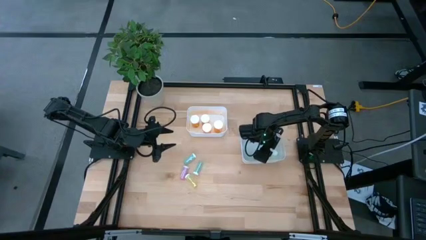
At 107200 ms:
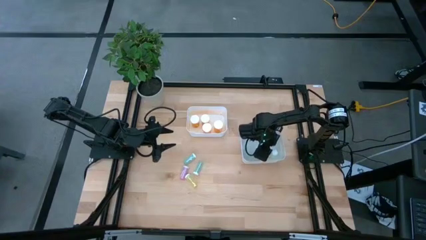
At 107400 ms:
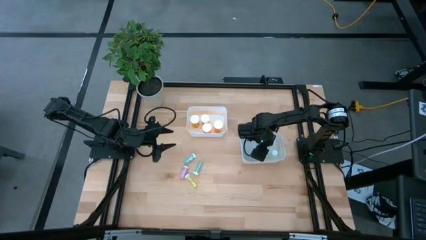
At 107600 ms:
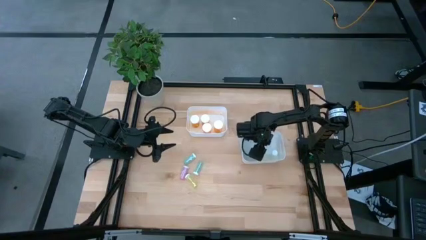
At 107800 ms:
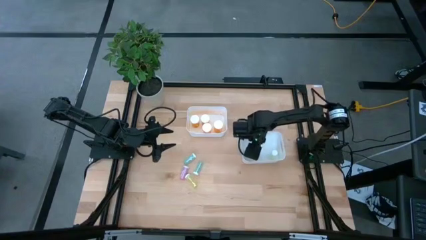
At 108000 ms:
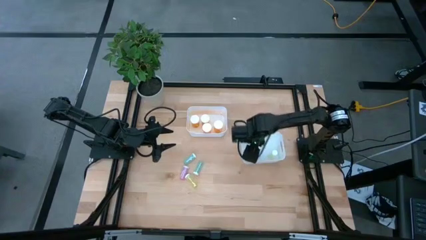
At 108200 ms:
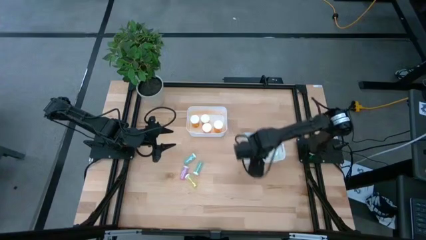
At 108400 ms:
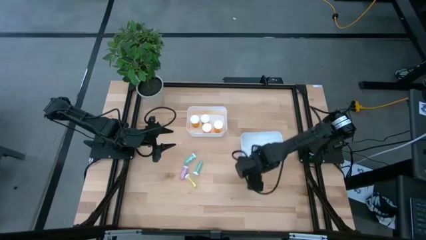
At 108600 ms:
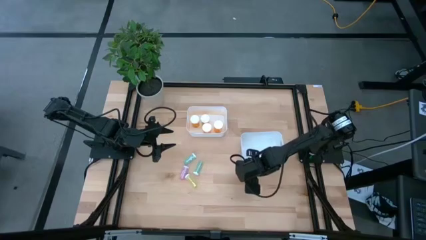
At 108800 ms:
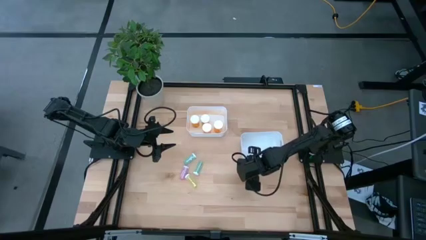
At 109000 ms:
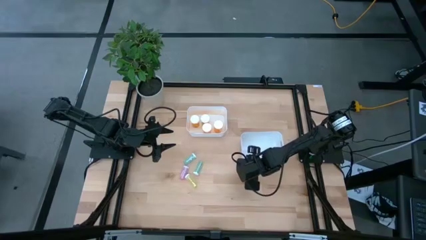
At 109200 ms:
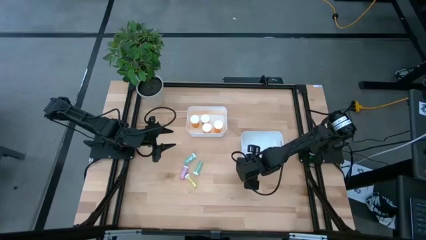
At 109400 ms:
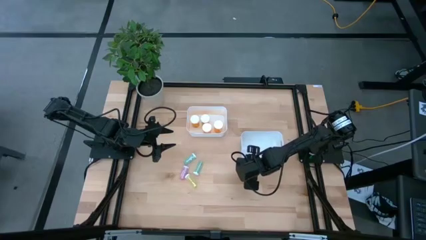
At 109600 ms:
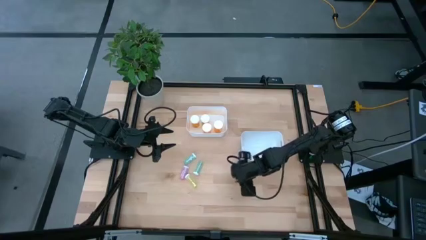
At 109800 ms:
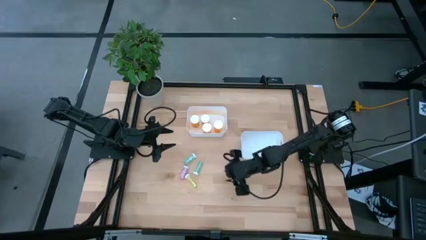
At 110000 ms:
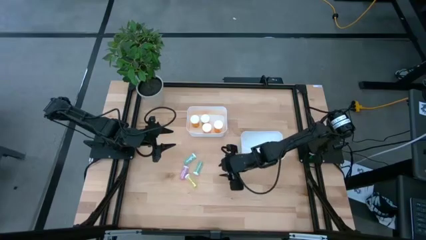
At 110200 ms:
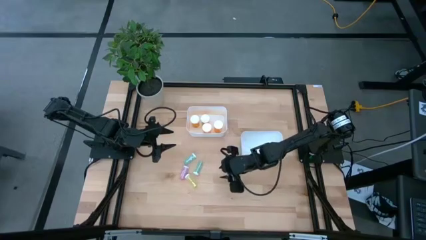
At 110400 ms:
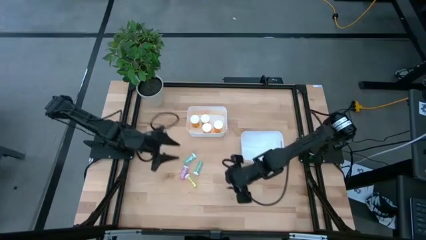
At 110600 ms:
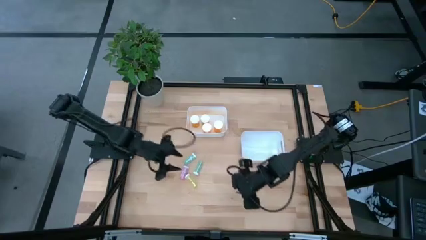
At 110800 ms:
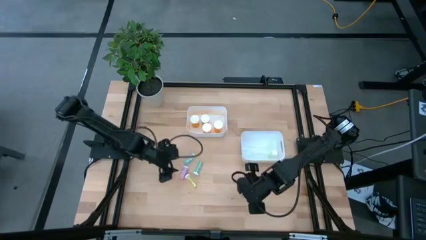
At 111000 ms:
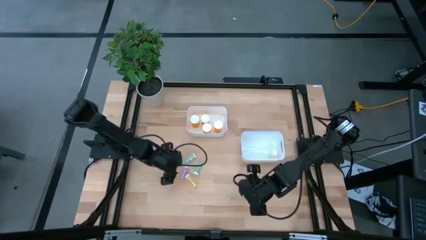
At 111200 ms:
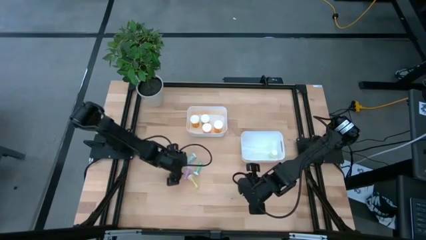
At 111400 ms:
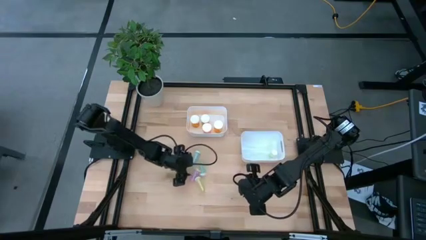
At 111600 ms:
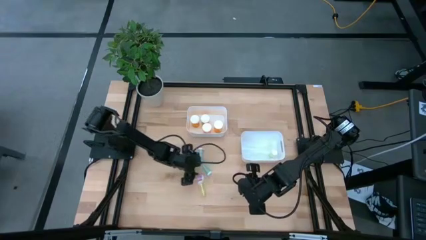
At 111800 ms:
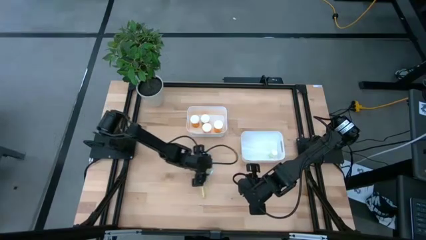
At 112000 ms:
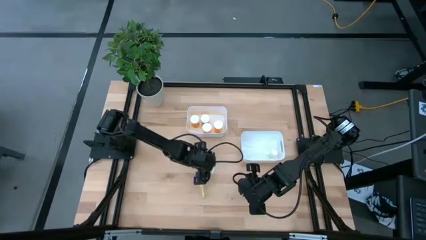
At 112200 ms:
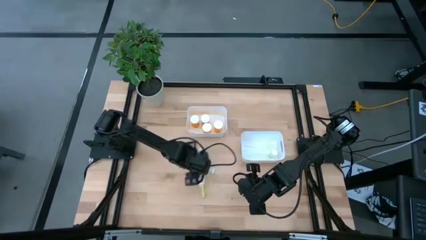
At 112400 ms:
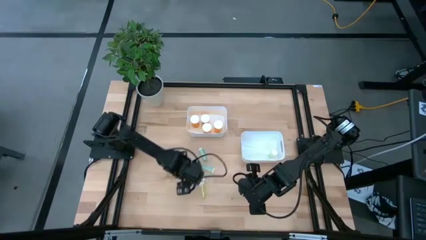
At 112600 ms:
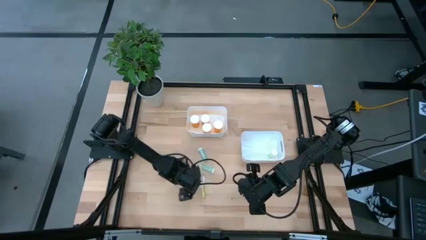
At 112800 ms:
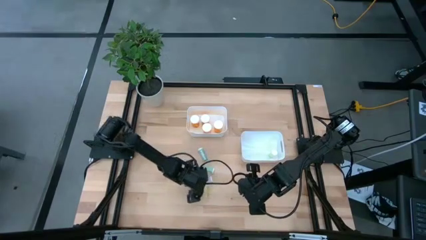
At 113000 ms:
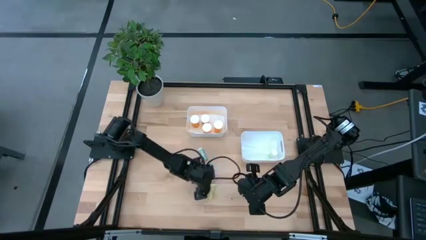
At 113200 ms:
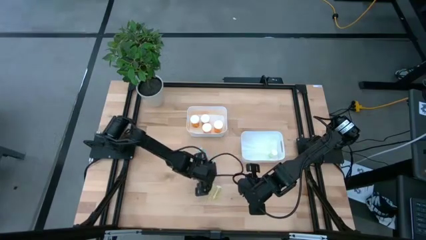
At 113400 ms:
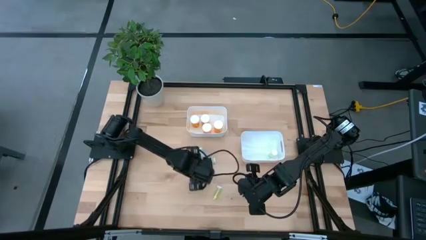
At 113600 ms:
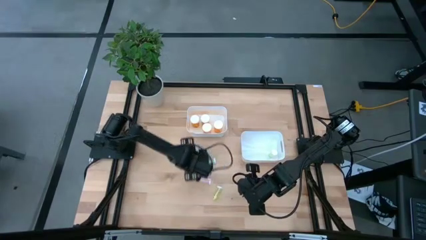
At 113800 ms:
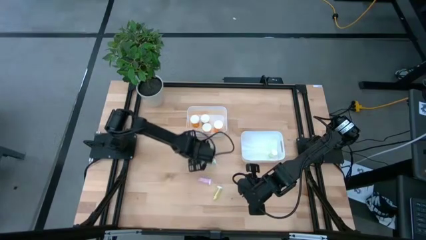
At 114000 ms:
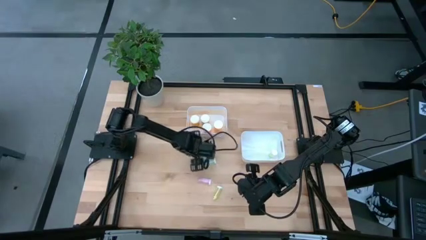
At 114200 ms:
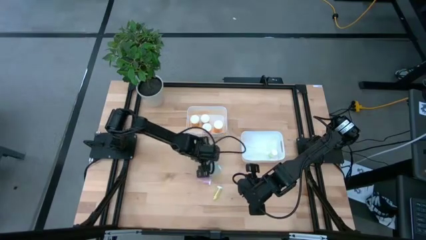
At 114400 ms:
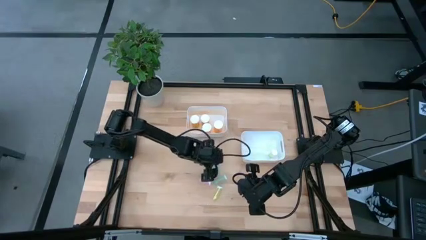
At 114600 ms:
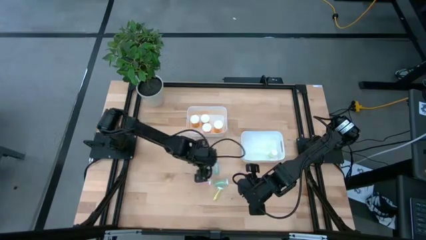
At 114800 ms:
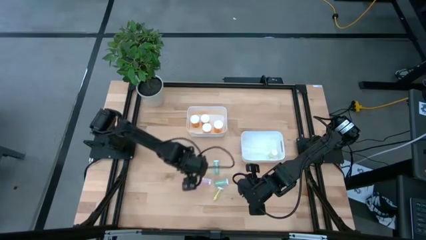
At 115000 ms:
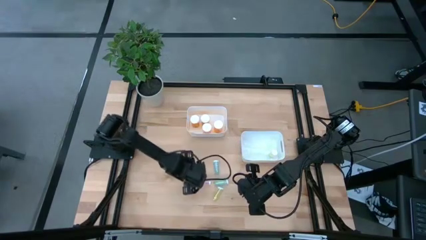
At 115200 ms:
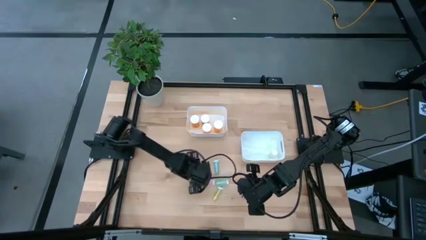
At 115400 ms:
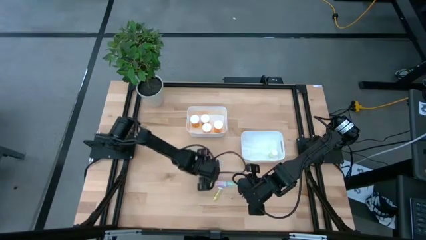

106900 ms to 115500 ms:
Task: Pick and place medicine bottles into bin by pill shape (circle, oval)
Adjust the small pill bottles

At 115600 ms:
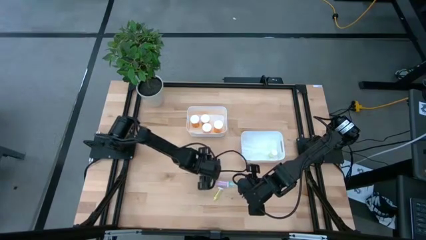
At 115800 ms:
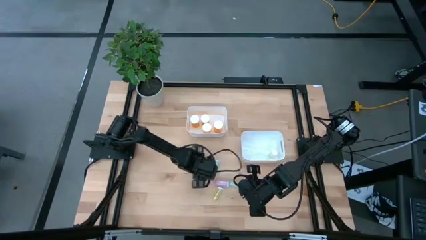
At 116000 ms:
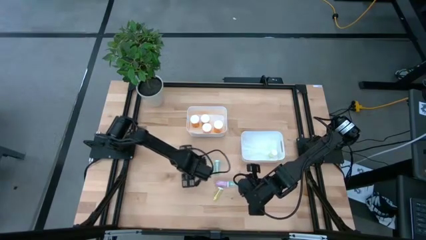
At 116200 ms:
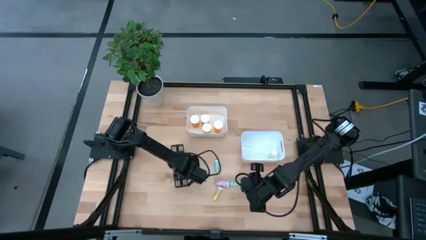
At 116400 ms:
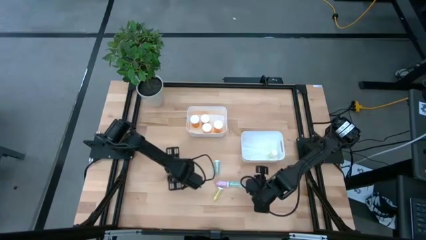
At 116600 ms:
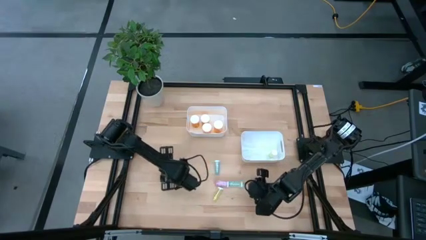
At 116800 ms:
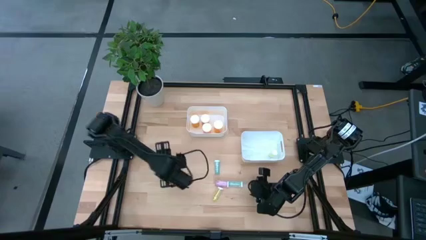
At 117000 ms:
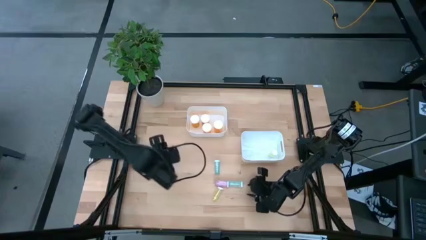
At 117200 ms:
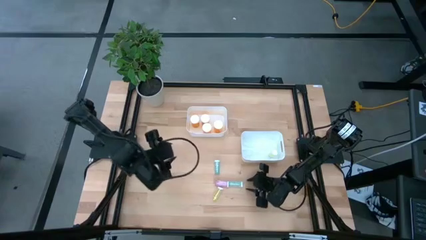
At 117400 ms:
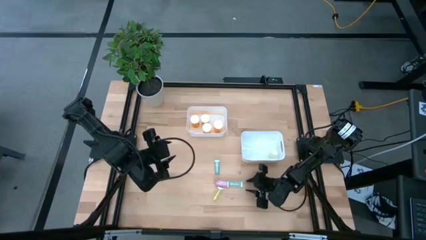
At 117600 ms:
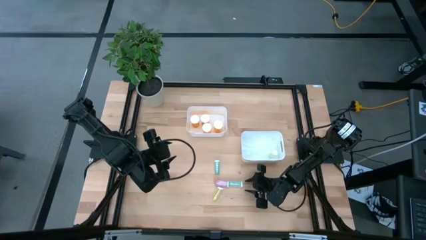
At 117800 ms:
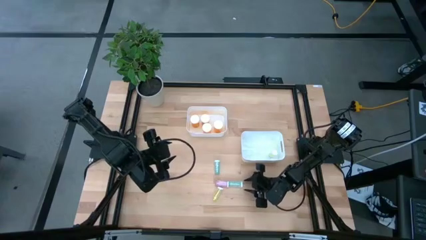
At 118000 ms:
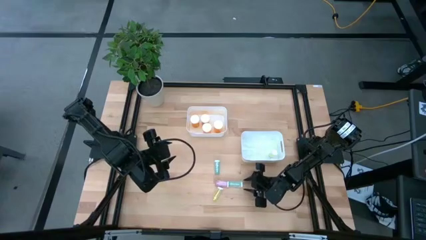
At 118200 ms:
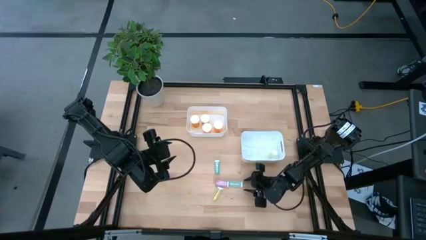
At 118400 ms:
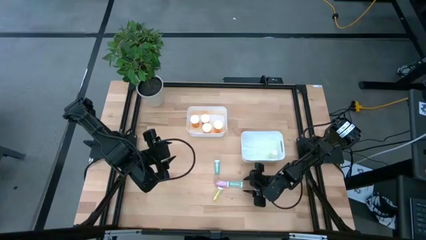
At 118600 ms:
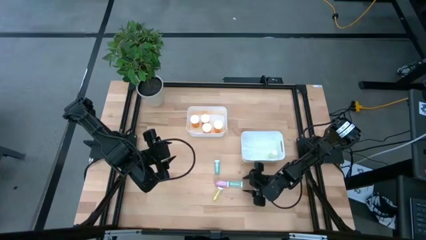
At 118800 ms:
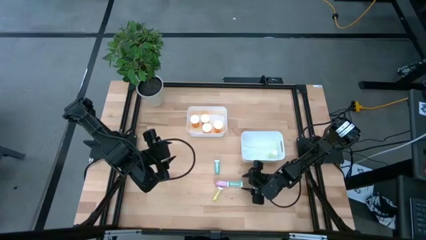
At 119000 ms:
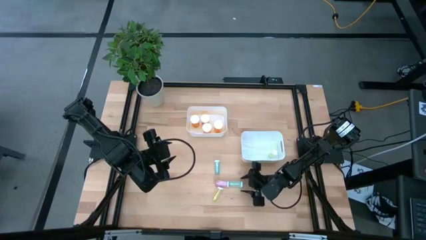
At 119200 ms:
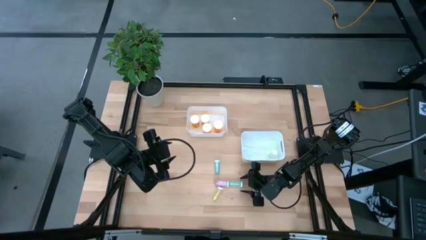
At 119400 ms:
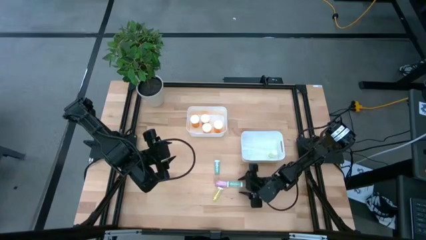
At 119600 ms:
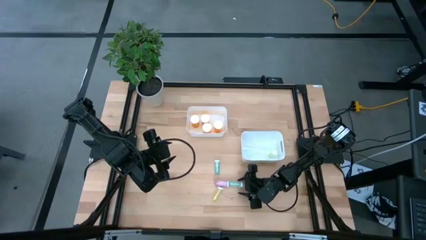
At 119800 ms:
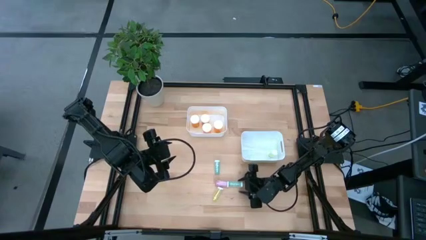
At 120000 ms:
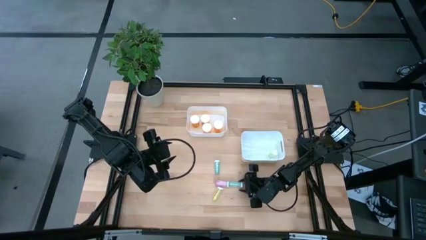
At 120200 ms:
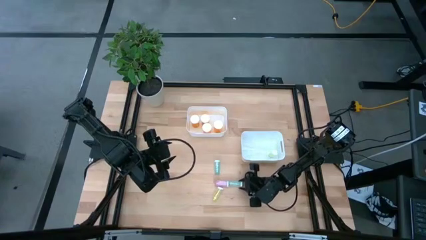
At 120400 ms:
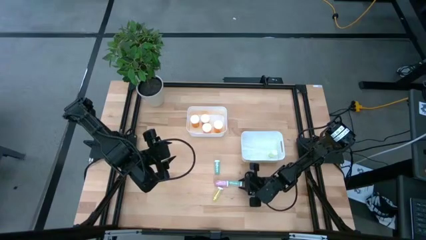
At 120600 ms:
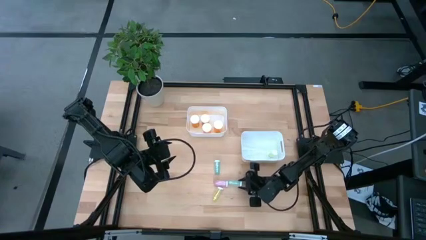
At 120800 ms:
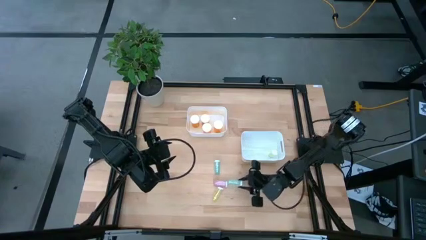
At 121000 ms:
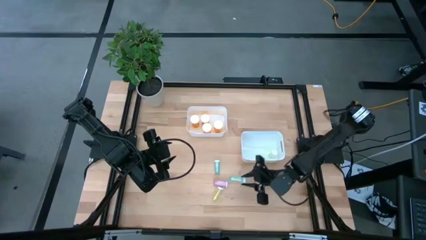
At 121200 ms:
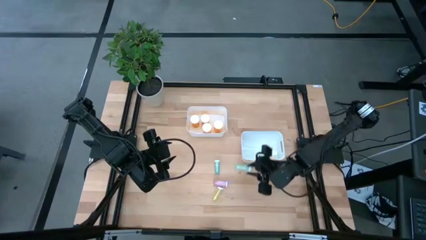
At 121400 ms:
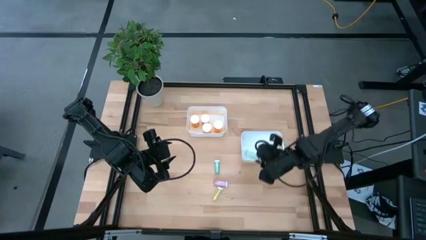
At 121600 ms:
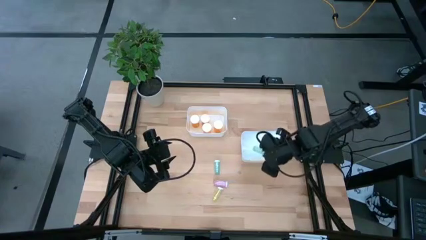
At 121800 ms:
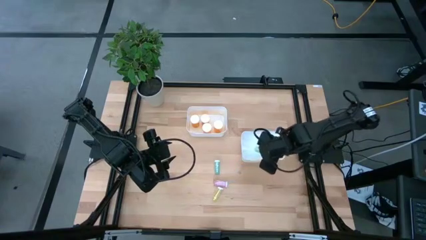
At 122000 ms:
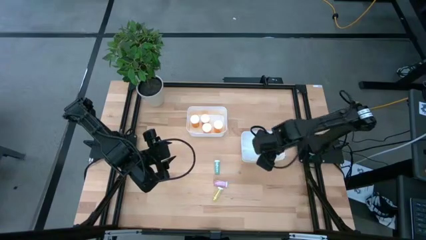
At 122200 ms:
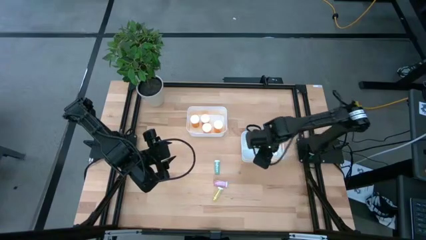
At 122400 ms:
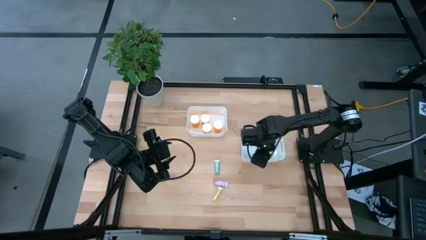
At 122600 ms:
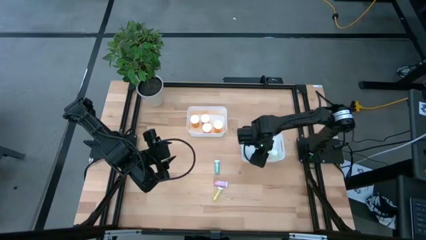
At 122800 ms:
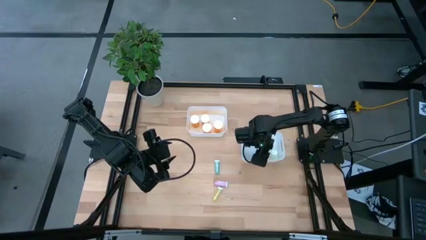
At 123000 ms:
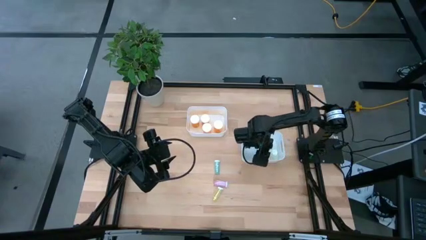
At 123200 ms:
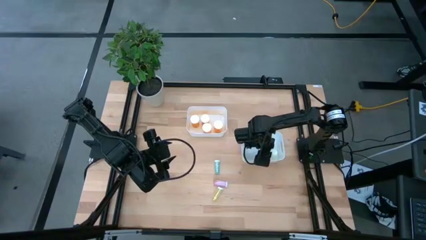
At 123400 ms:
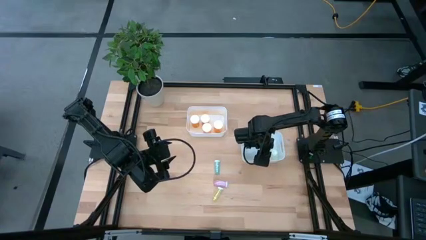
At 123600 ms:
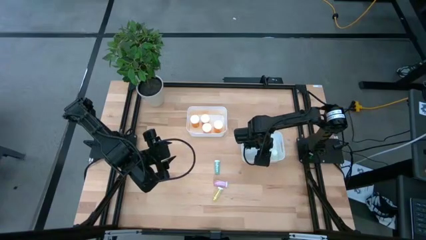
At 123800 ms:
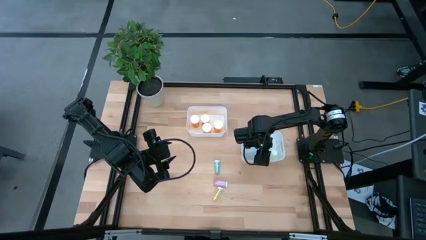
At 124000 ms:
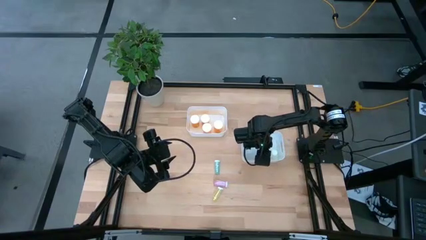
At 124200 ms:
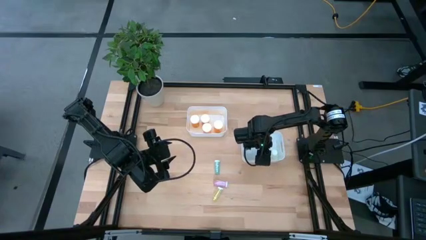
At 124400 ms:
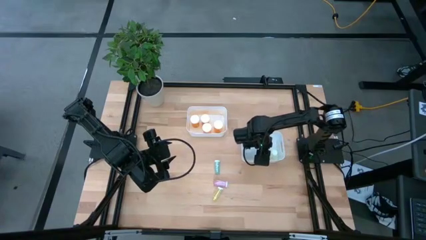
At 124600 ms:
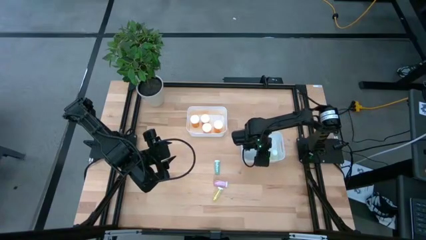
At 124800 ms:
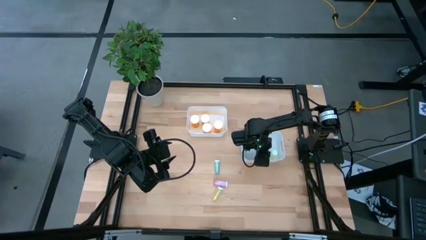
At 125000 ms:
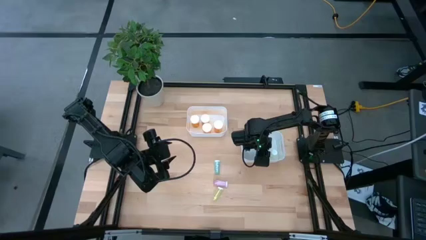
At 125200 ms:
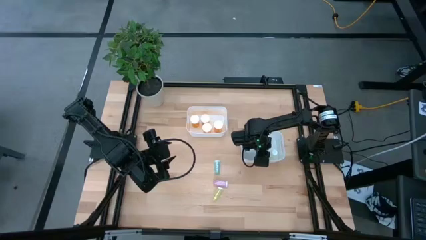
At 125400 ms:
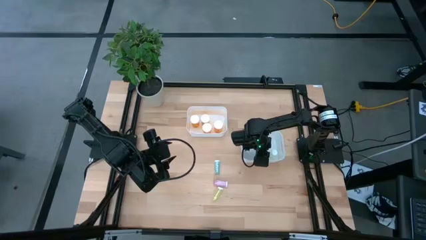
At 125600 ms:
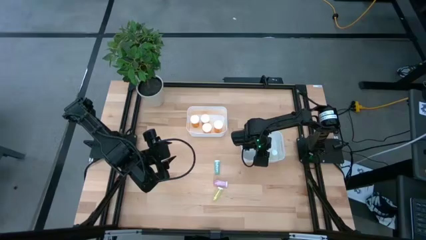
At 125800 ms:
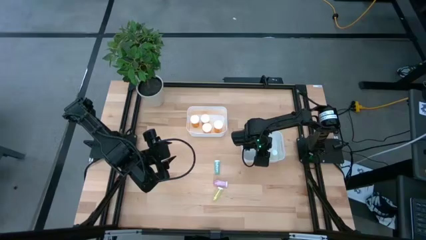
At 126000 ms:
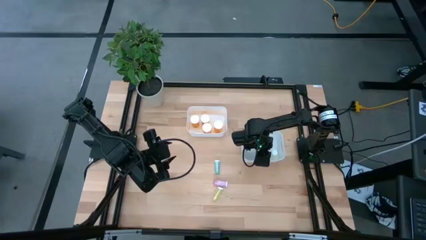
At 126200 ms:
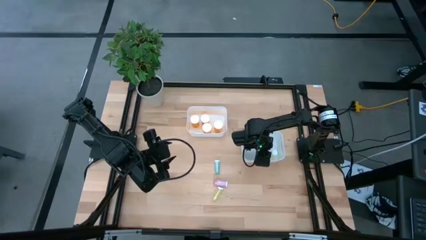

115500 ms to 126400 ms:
Put the small blue pill bottle into the bottom white bin
